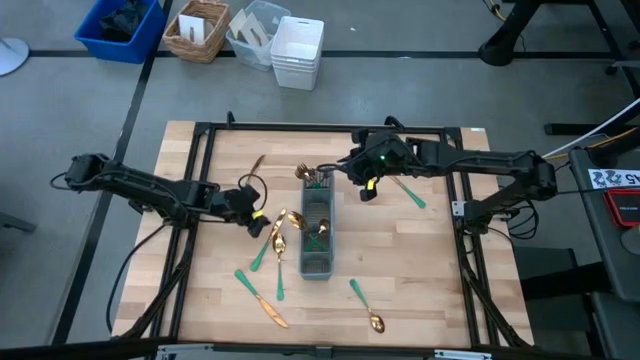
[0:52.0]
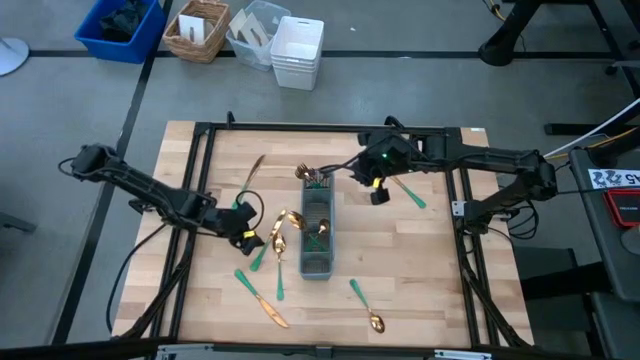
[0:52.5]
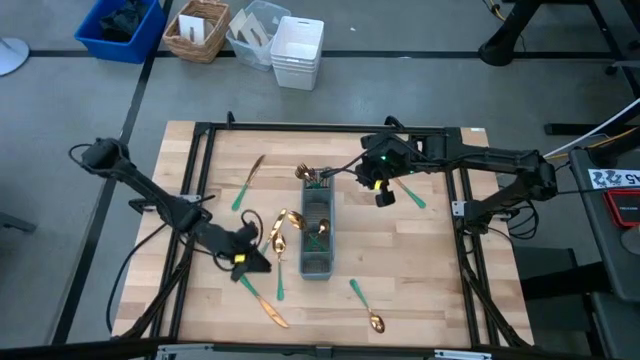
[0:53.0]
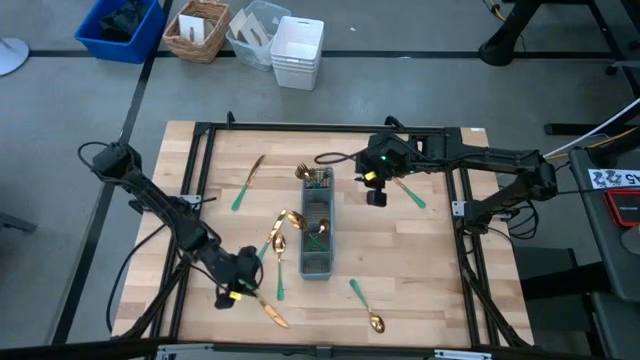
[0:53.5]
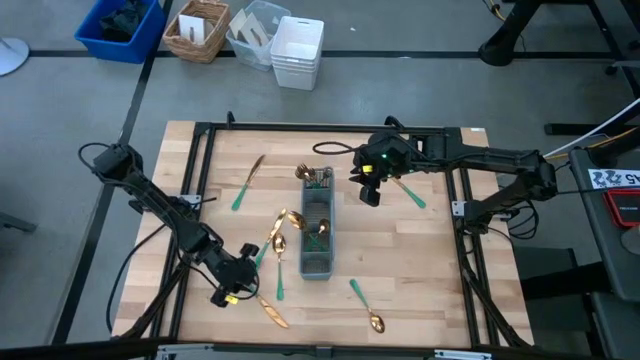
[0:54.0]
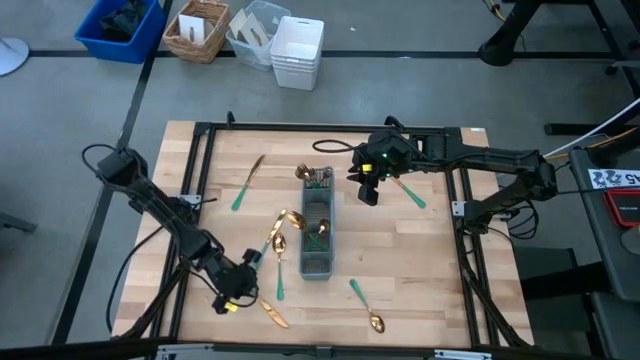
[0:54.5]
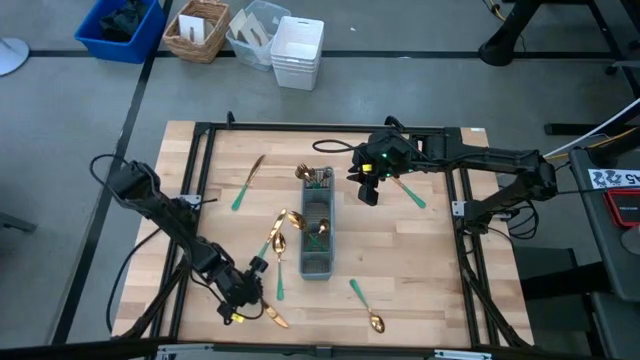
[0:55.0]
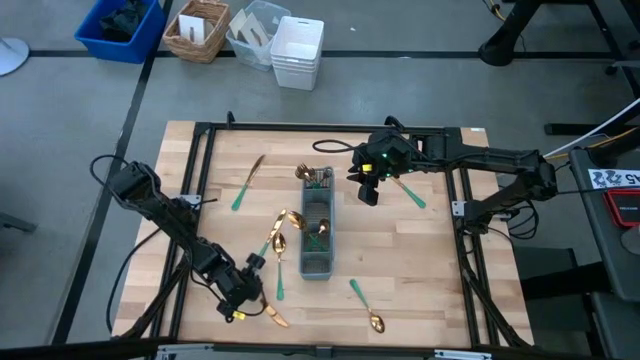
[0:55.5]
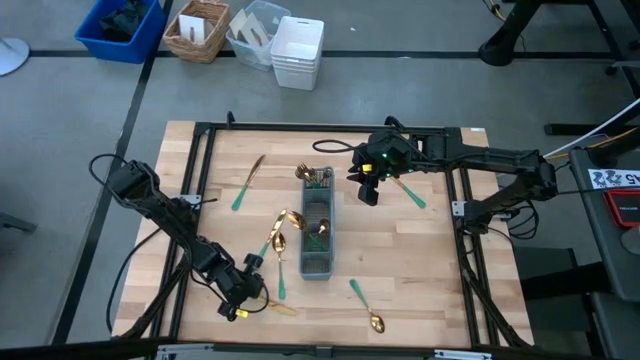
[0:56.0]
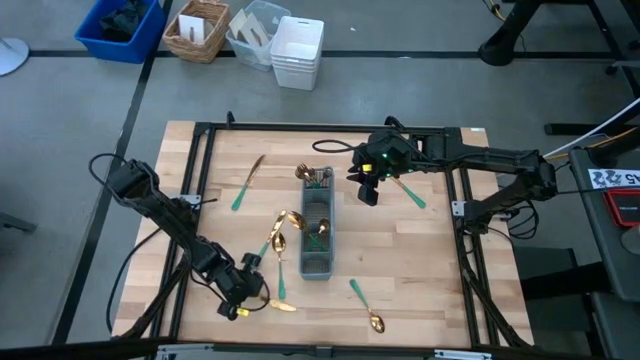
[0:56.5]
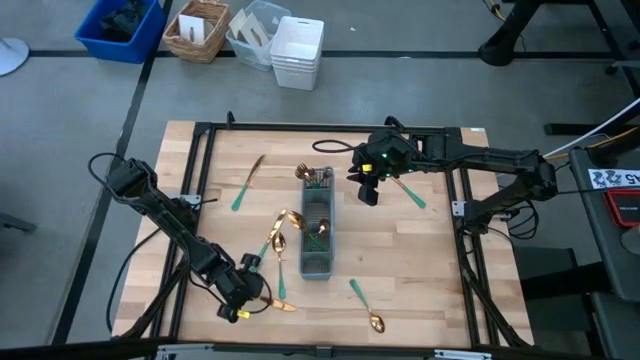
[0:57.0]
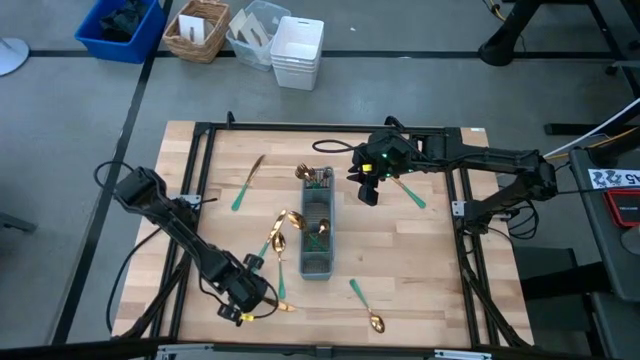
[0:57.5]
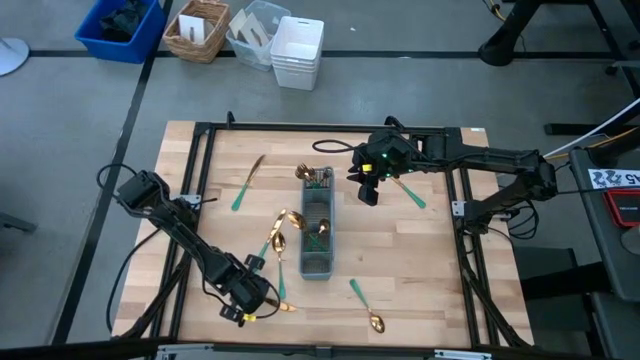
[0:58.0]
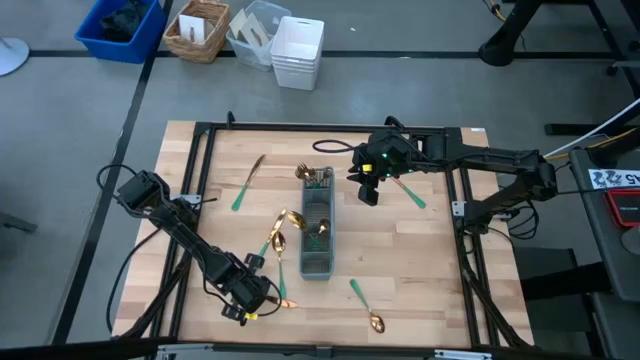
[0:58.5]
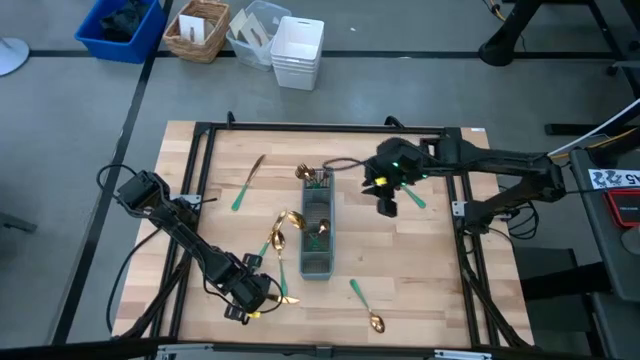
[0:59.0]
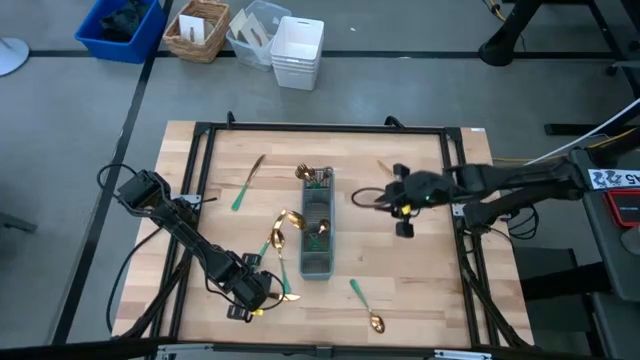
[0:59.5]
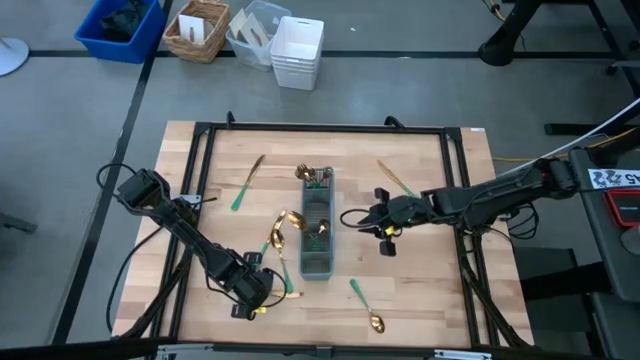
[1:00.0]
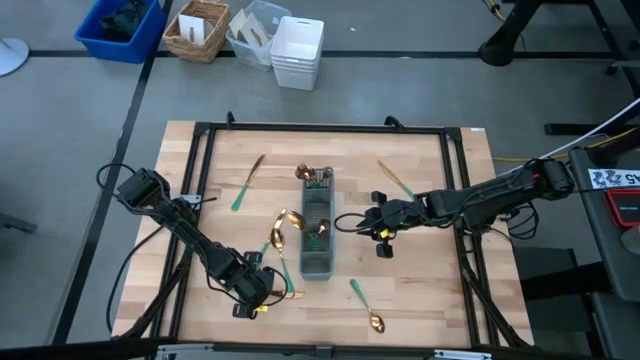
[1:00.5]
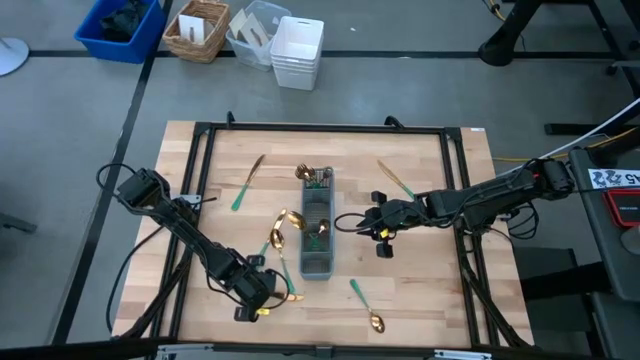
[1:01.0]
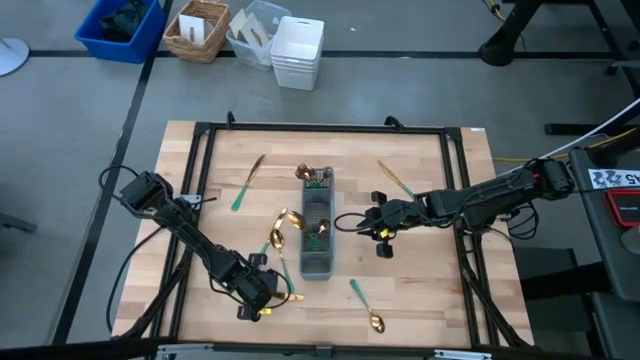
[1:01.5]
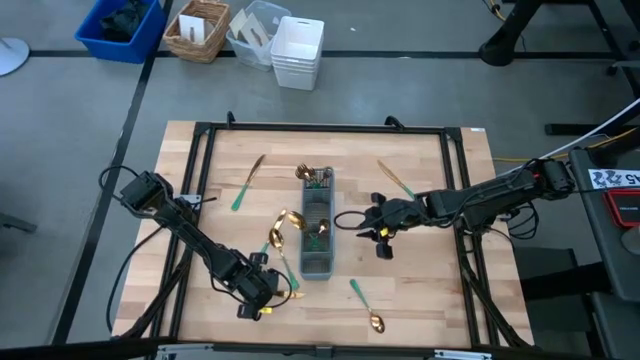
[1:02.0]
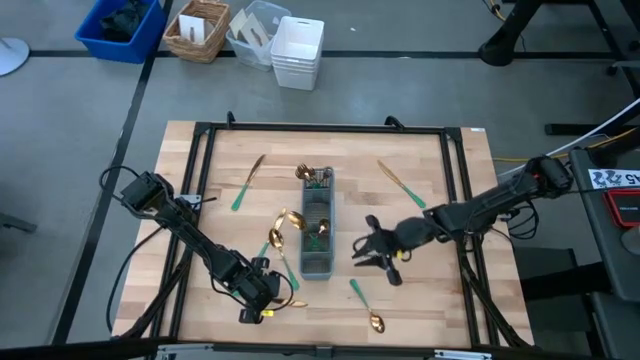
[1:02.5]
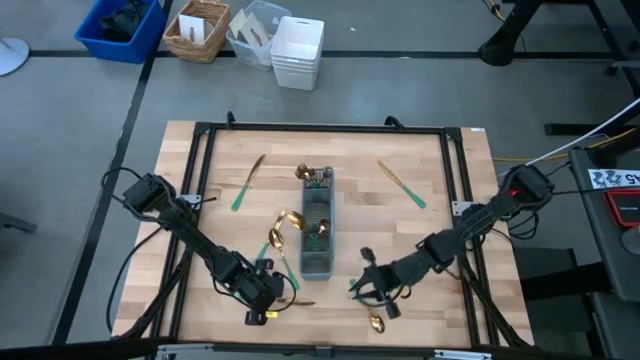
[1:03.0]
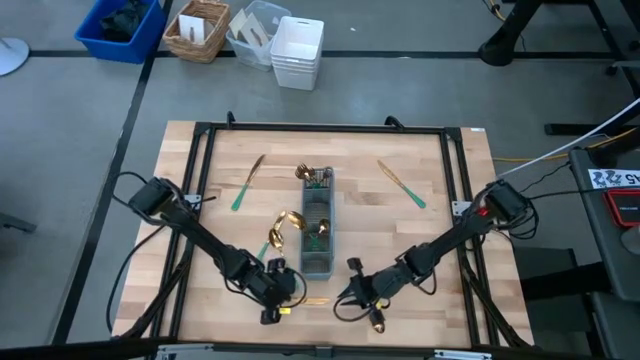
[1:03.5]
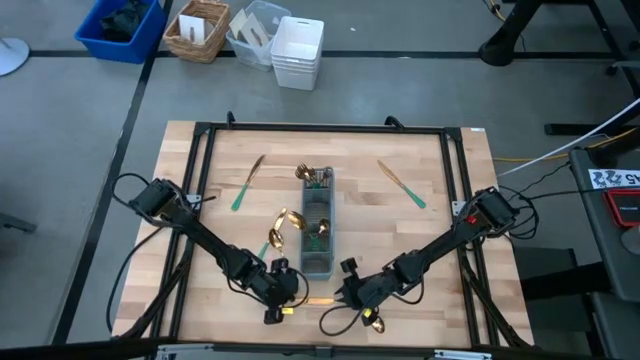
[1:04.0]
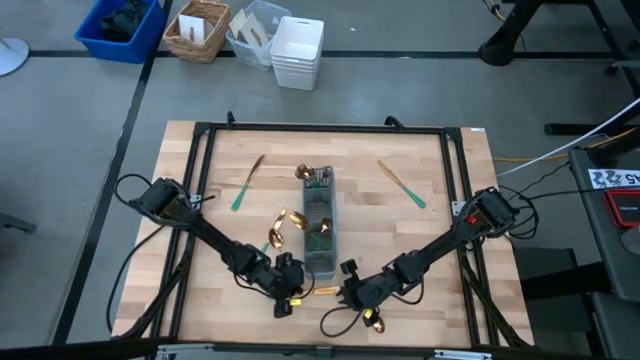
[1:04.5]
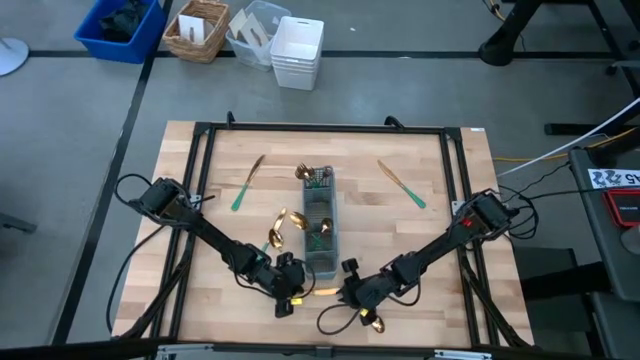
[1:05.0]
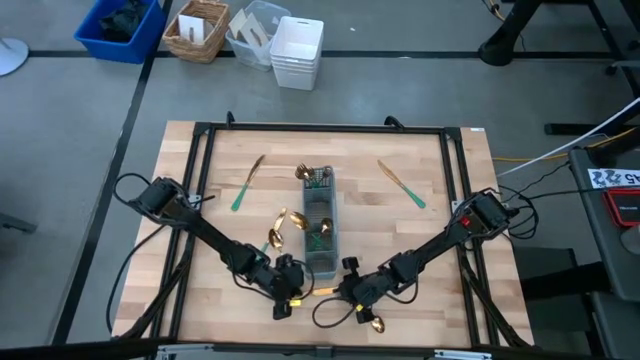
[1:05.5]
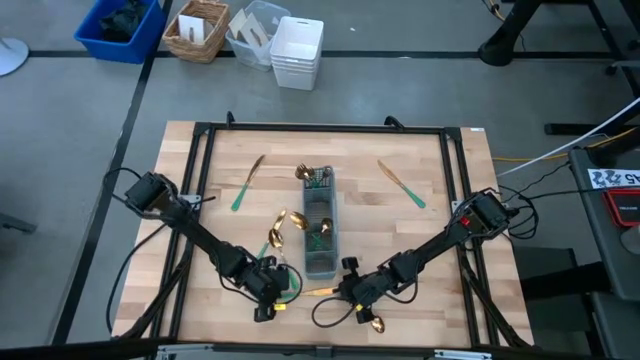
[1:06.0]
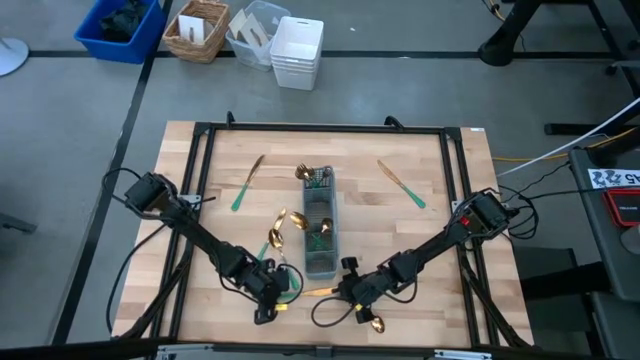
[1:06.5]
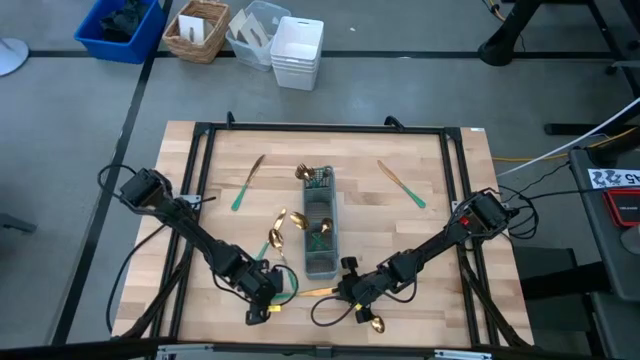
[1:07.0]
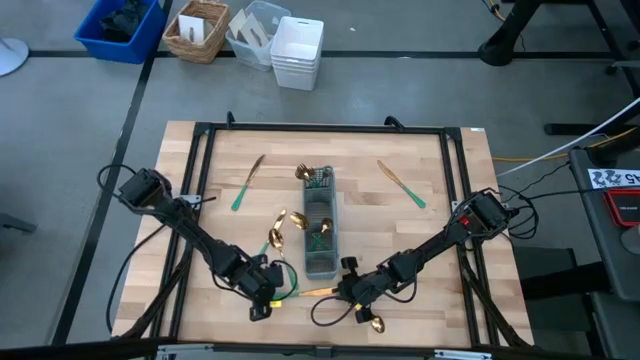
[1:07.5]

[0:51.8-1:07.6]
Task: Sort silverware
Put the green knife into the utensil rack

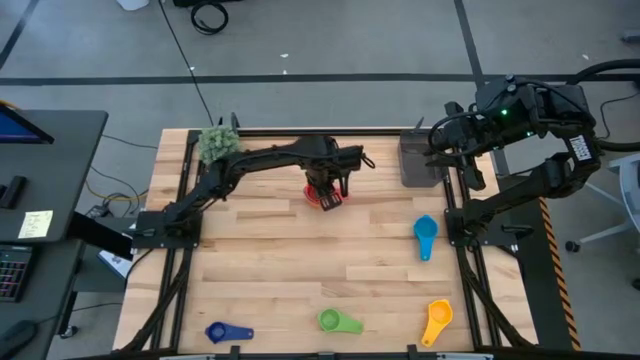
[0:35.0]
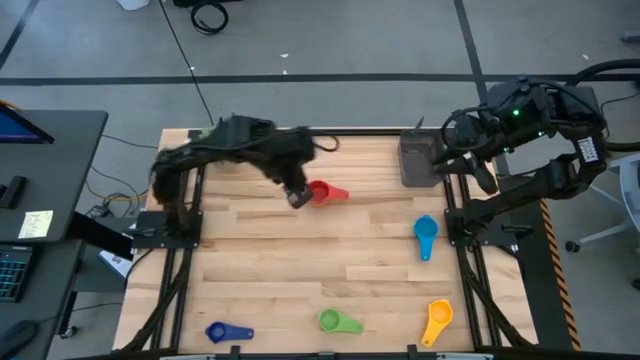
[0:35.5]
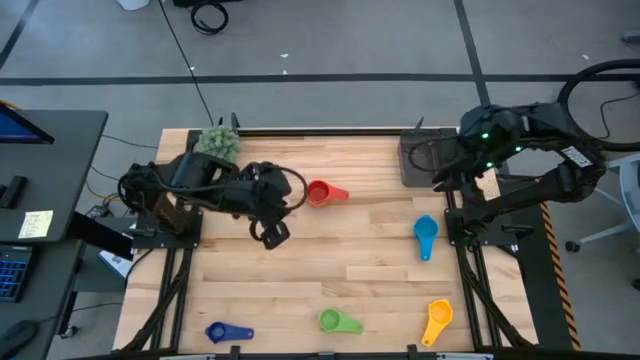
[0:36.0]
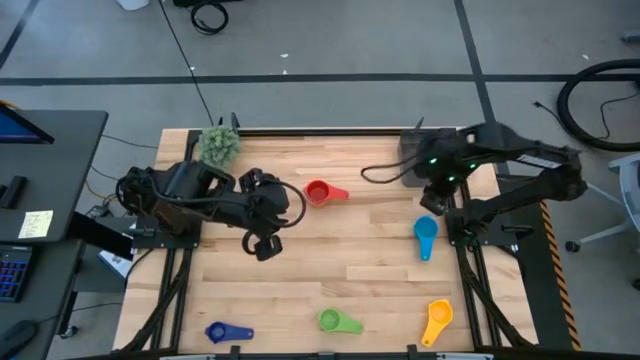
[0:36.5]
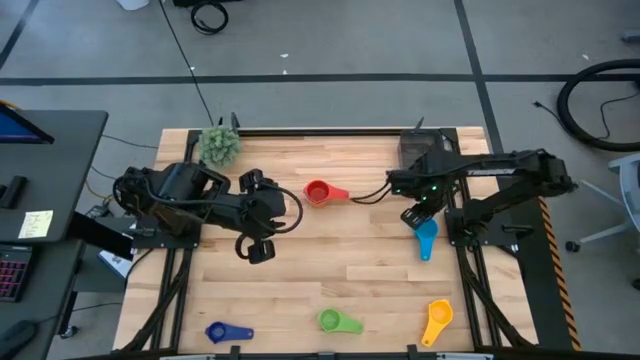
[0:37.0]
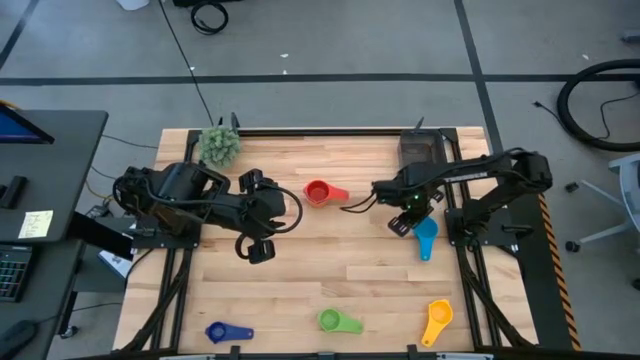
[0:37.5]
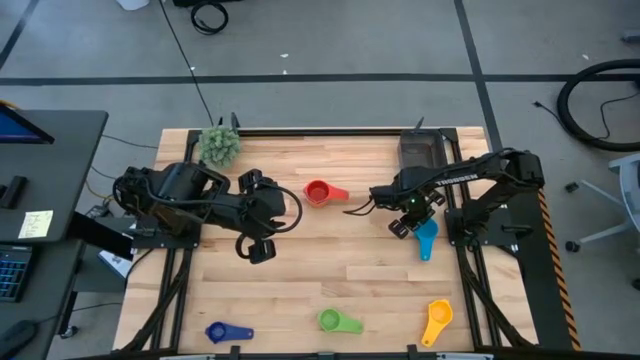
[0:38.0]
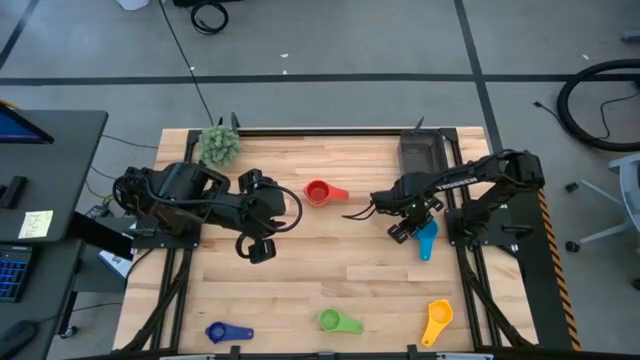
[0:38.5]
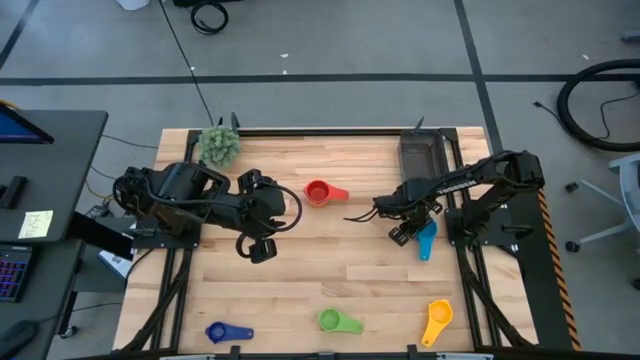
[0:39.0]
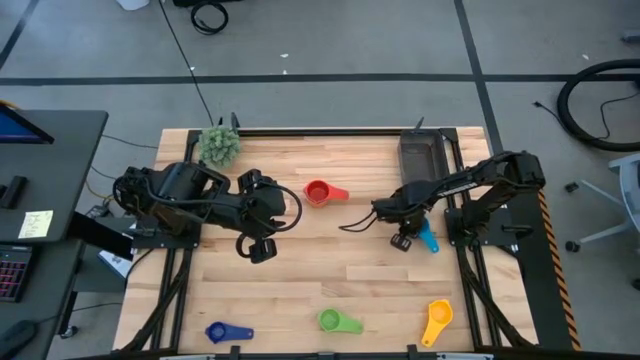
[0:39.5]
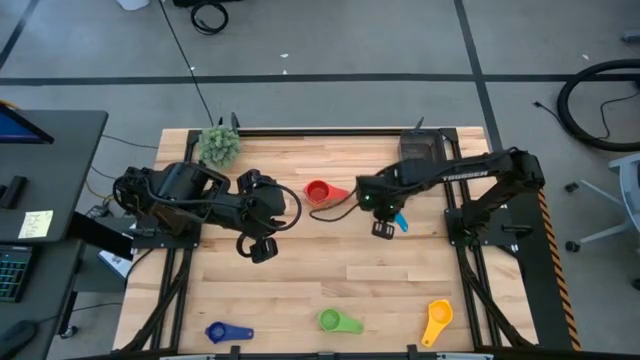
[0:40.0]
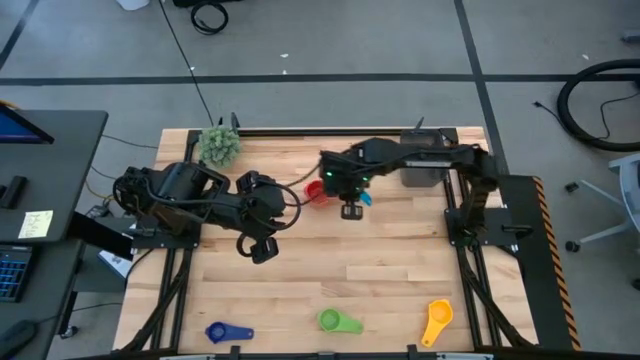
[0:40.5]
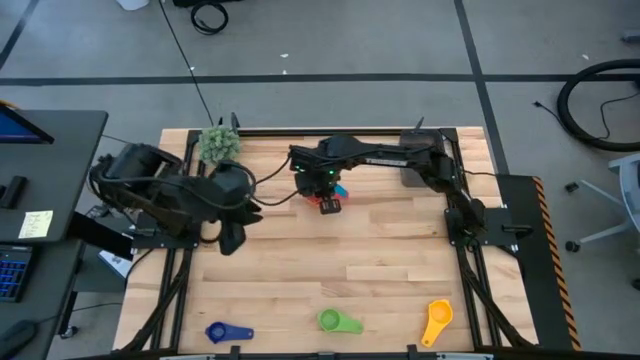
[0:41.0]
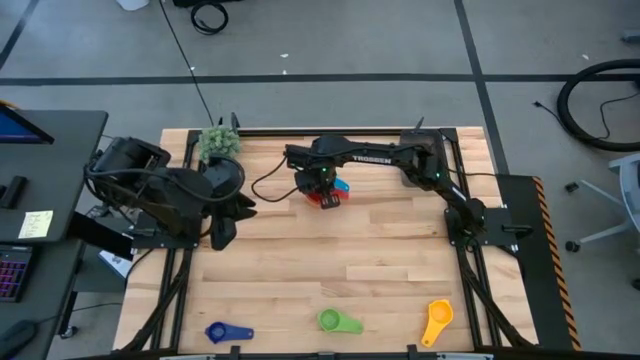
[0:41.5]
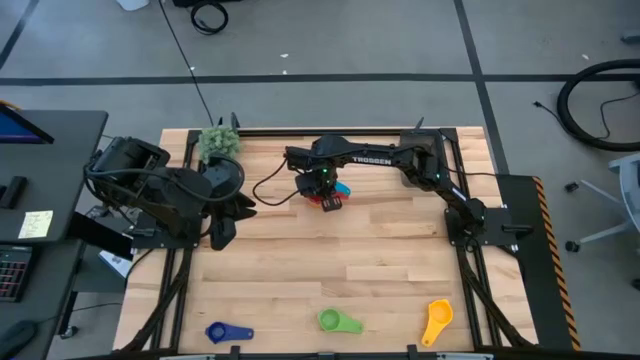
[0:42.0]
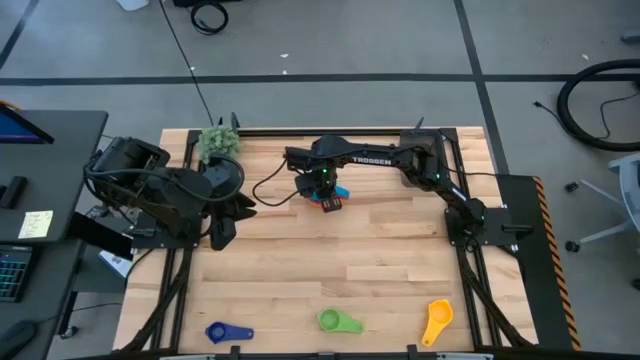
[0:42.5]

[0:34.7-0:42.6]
Task: Nest measuring cups in basket
Stack the light blue measuring cup on top of the red measuring cup
